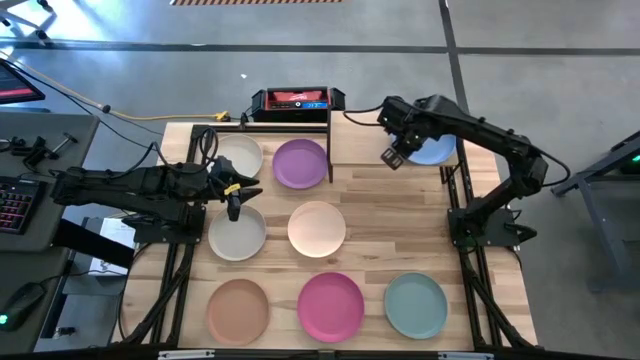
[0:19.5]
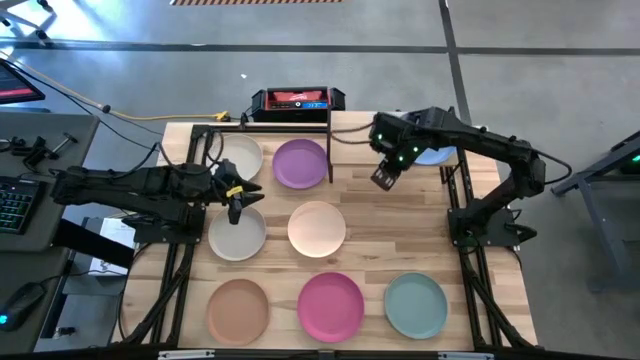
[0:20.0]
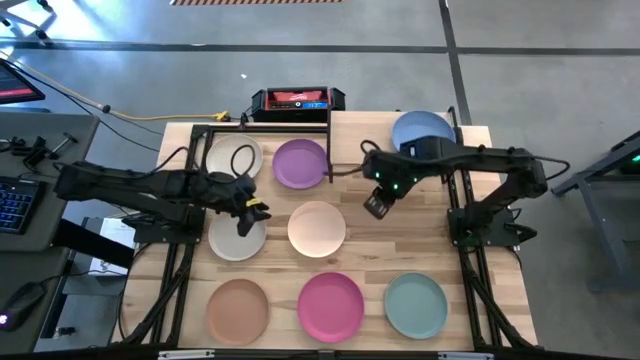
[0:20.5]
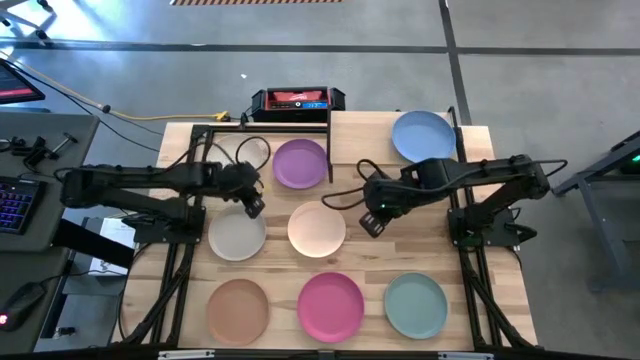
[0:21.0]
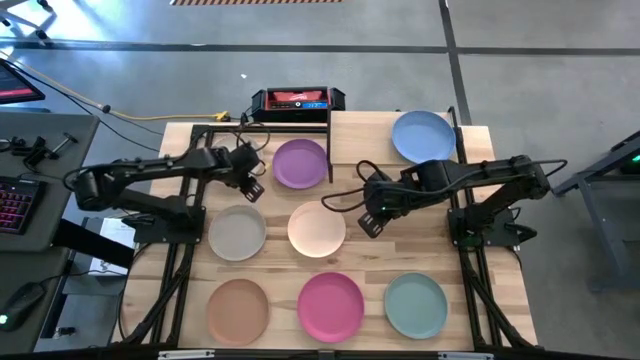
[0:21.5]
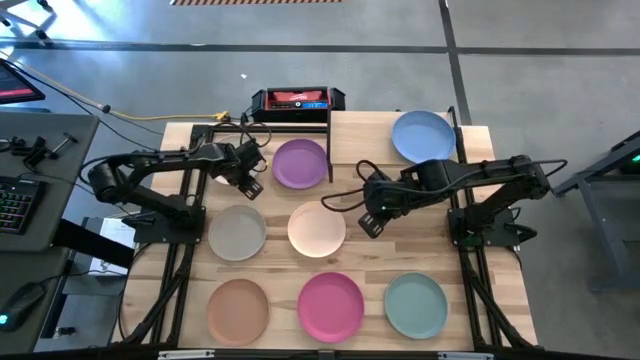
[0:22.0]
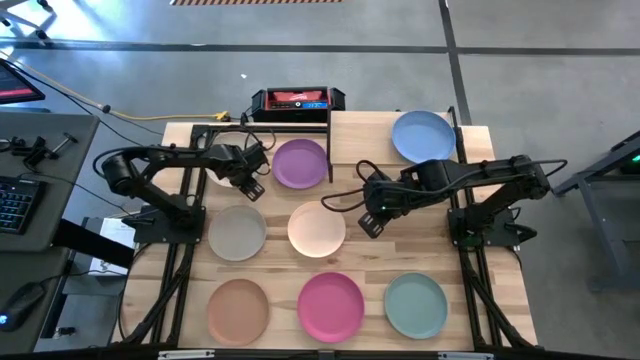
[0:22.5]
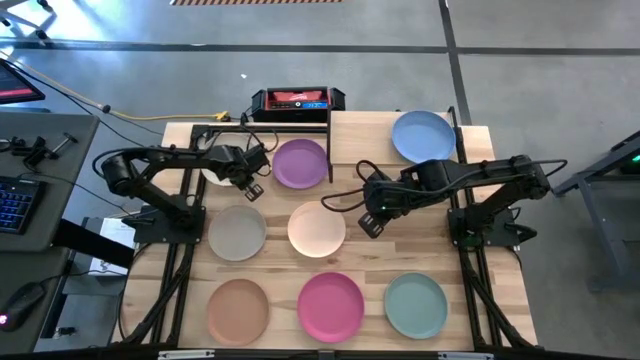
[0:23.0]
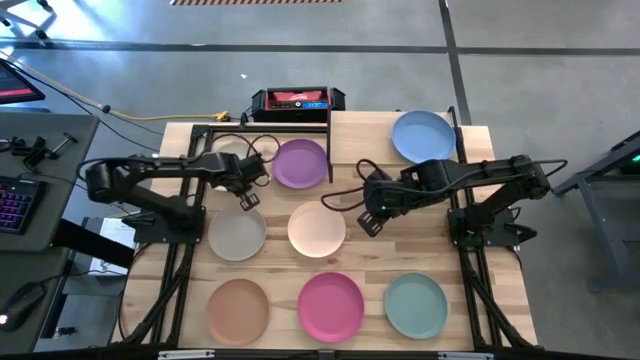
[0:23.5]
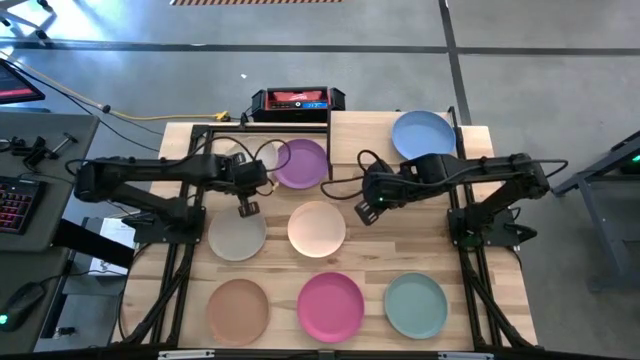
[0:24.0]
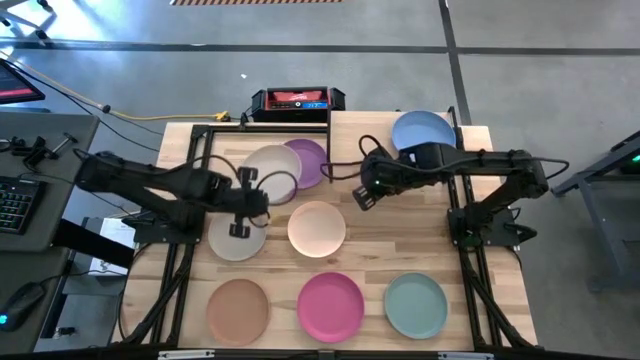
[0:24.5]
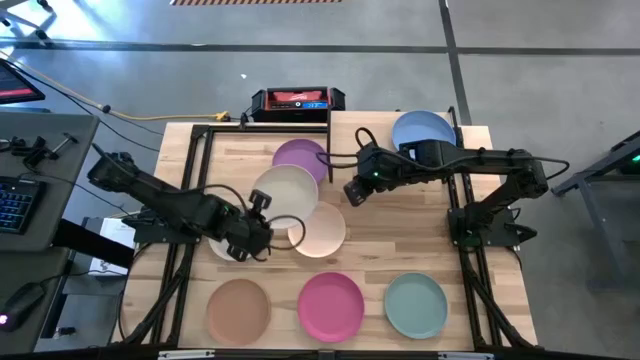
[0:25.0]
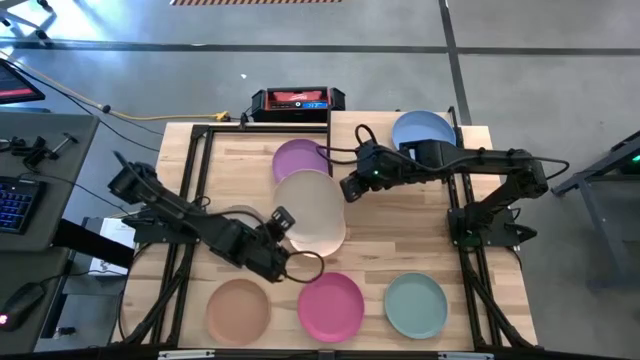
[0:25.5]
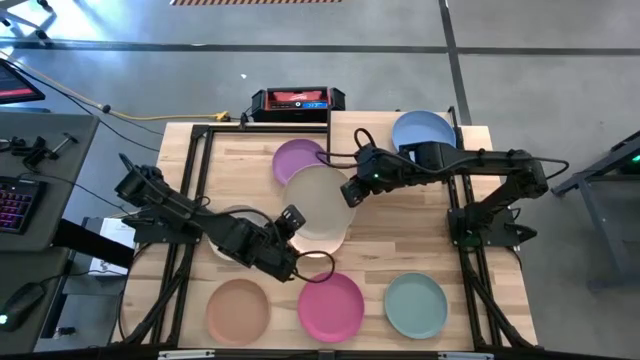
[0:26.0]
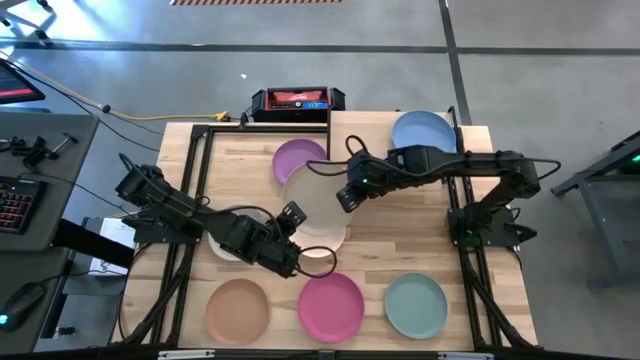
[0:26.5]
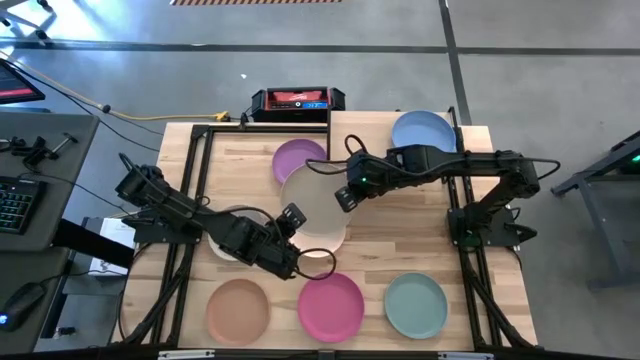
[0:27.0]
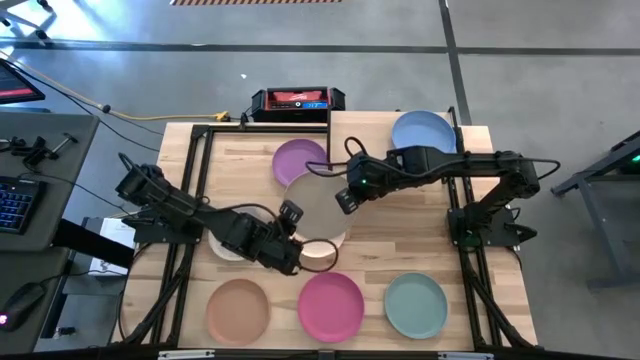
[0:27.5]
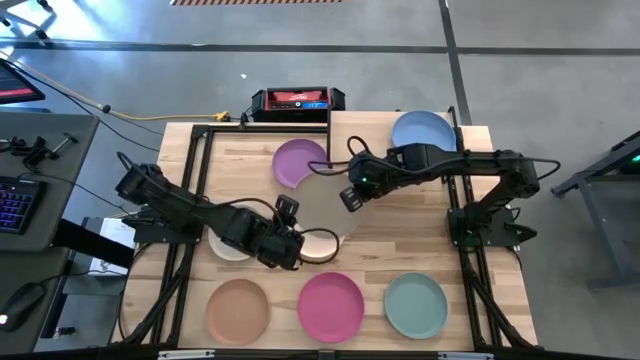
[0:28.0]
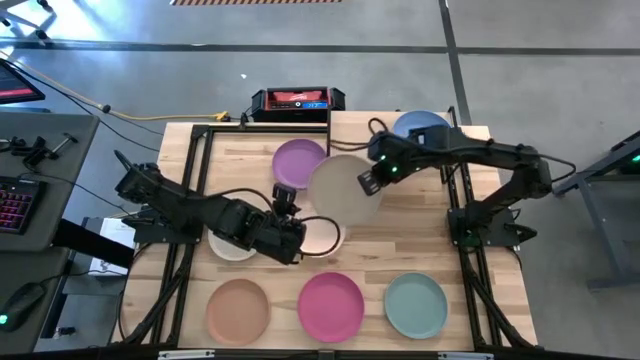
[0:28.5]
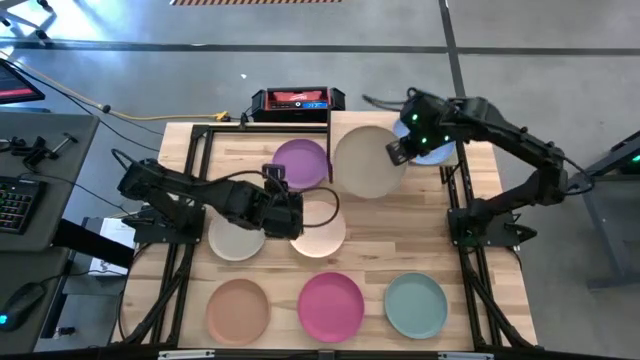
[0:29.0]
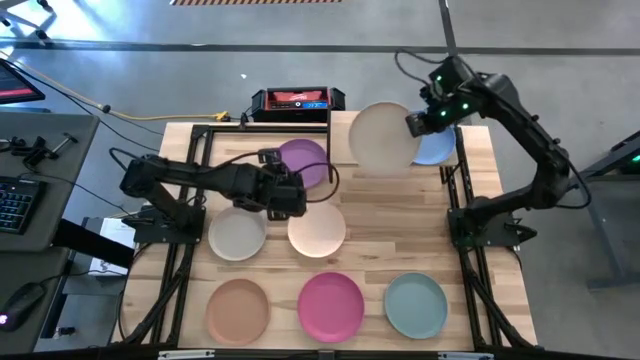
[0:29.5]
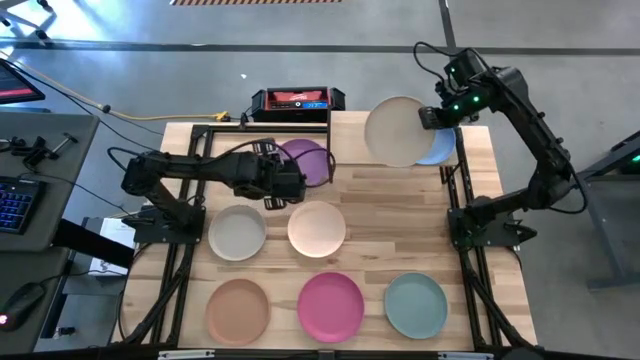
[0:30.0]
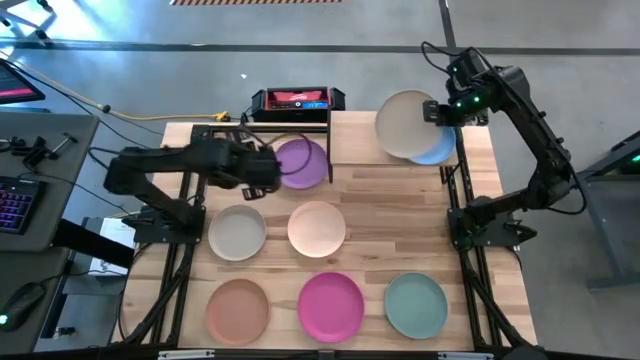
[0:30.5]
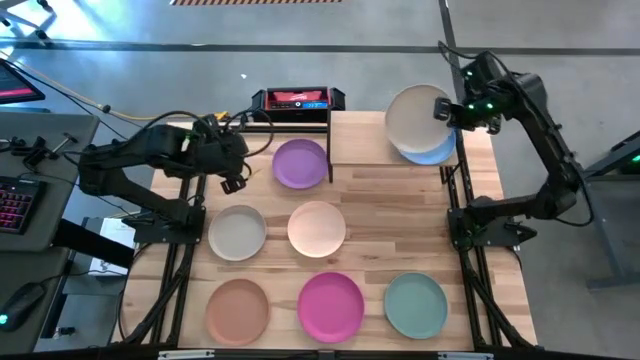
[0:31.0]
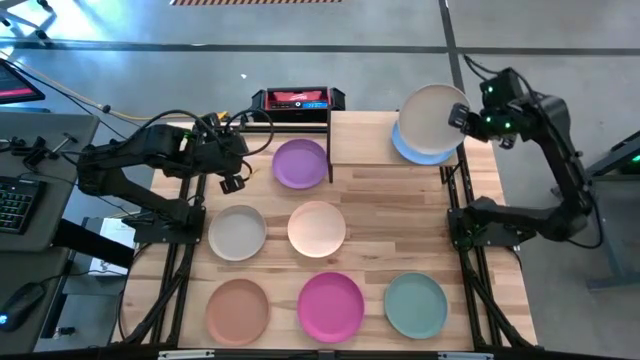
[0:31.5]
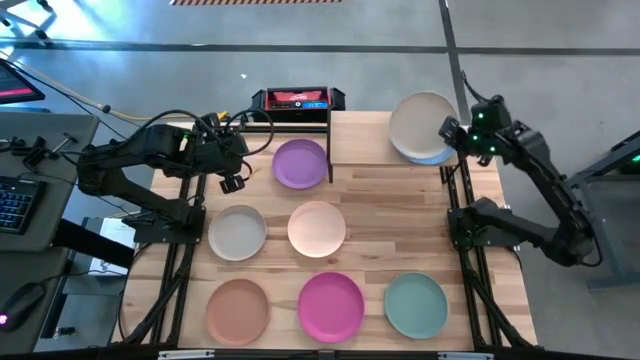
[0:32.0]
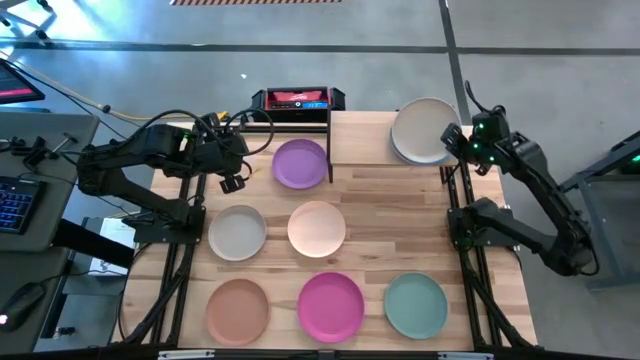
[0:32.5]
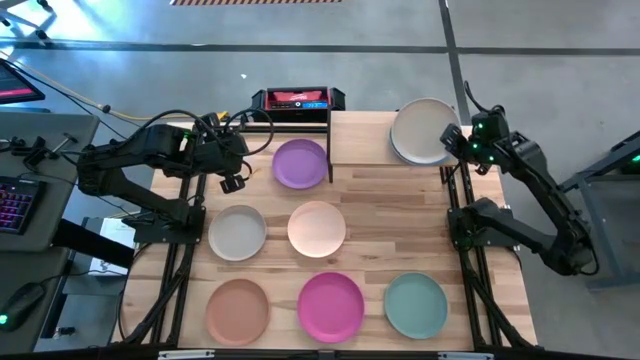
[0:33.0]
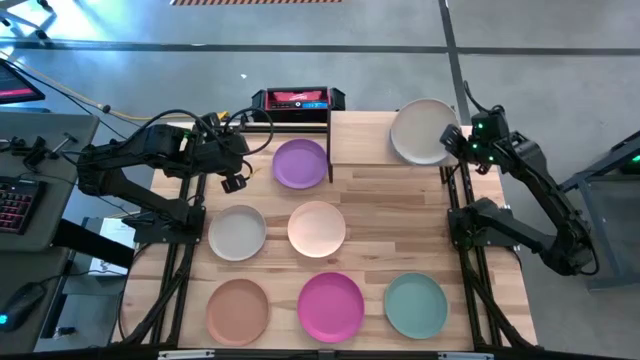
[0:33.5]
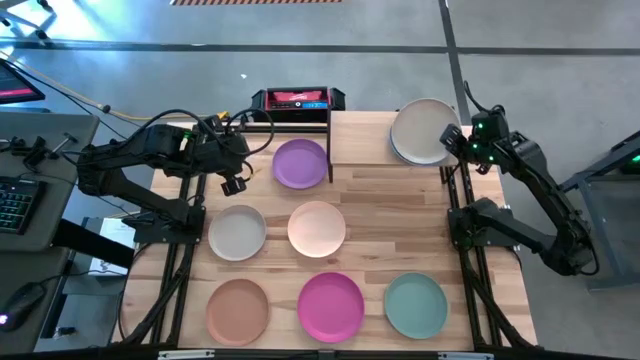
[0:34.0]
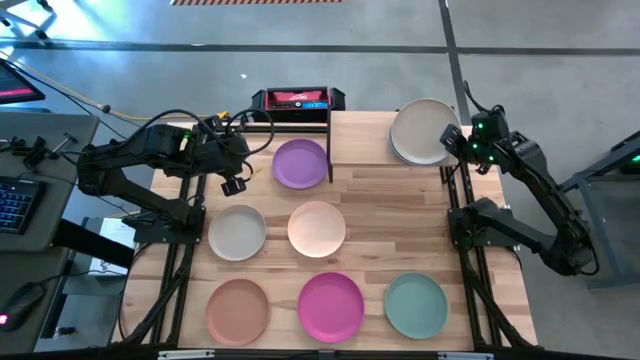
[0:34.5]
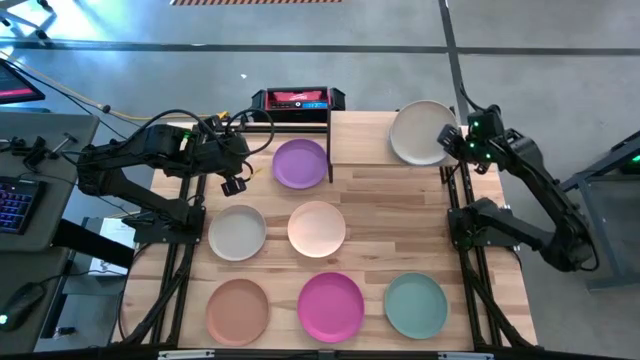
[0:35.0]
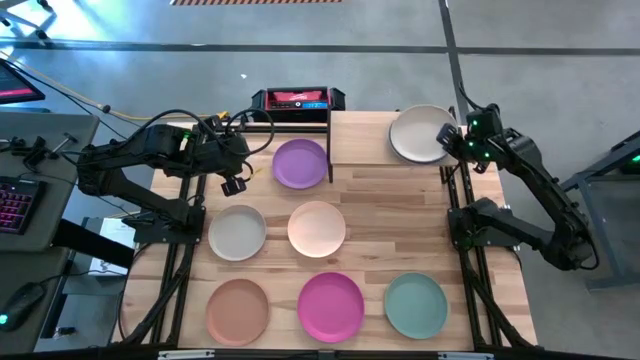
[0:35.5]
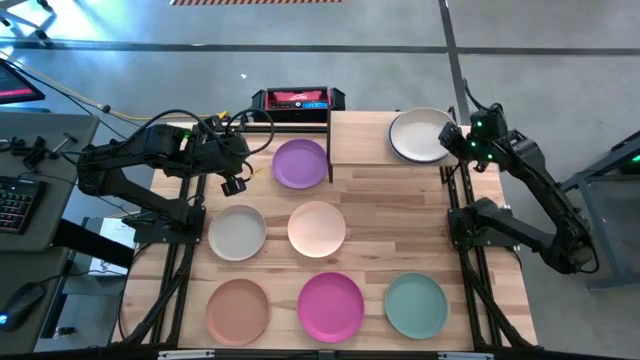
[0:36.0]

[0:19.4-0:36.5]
Task: Place and stack plates onto a shelf
Stack the white plate on top of the blue plate on the shelf

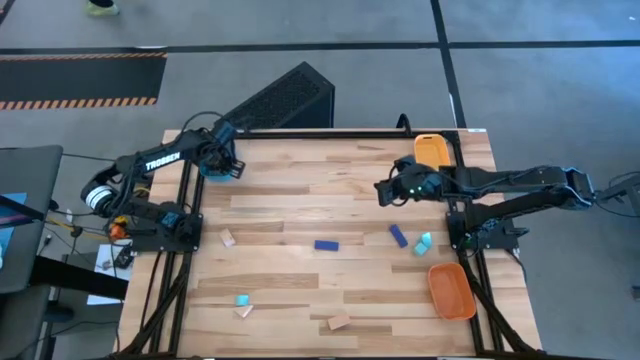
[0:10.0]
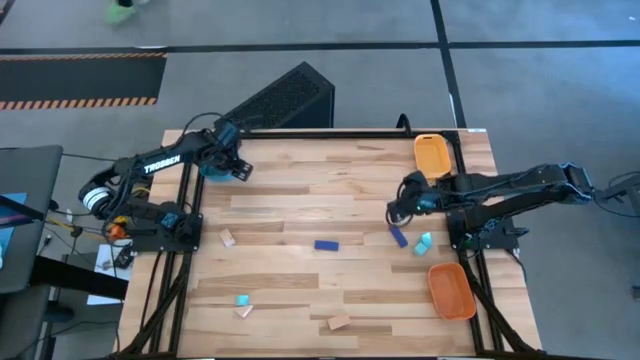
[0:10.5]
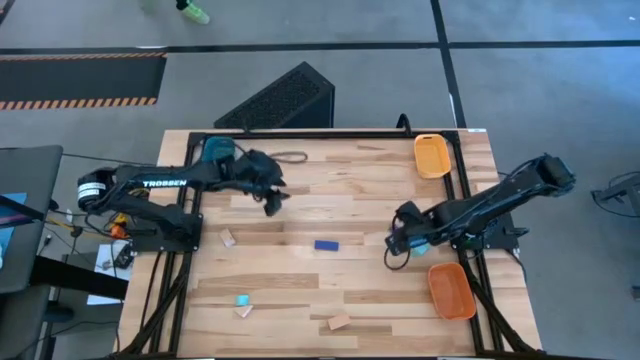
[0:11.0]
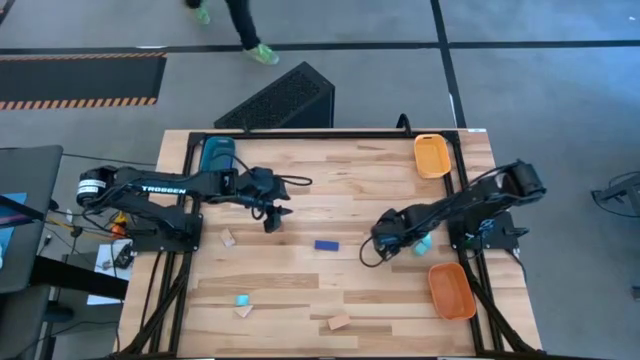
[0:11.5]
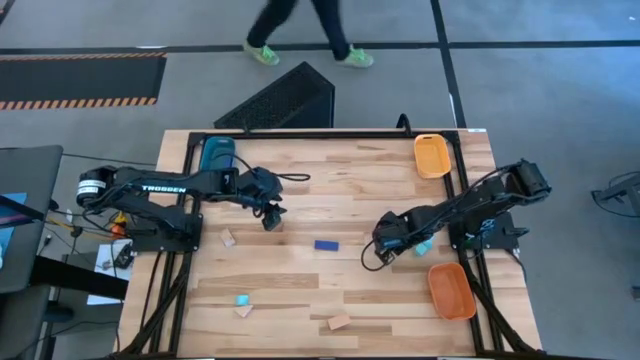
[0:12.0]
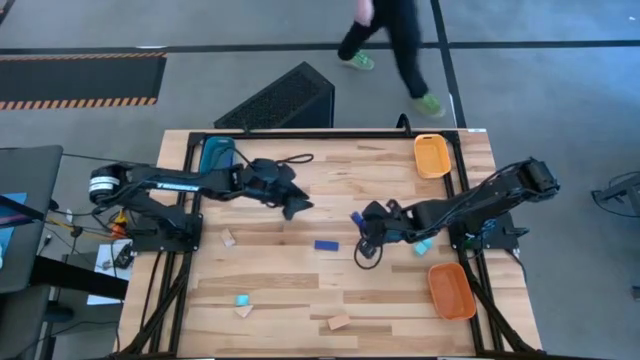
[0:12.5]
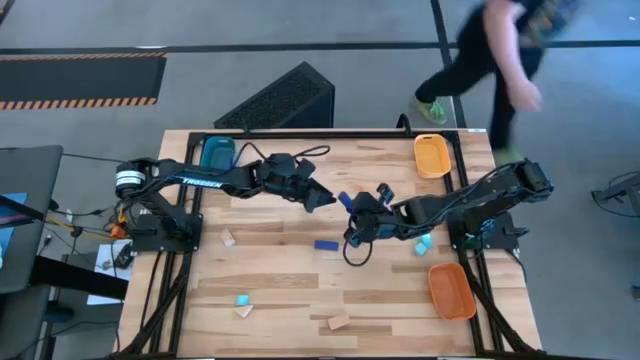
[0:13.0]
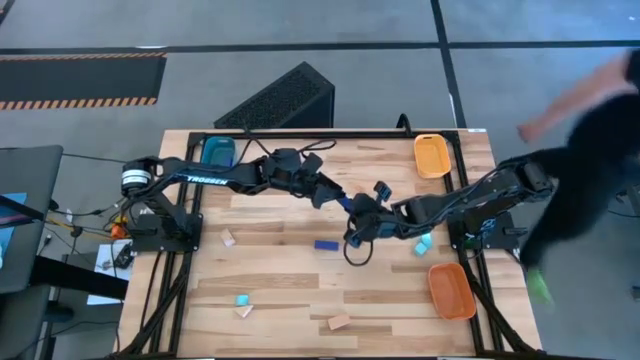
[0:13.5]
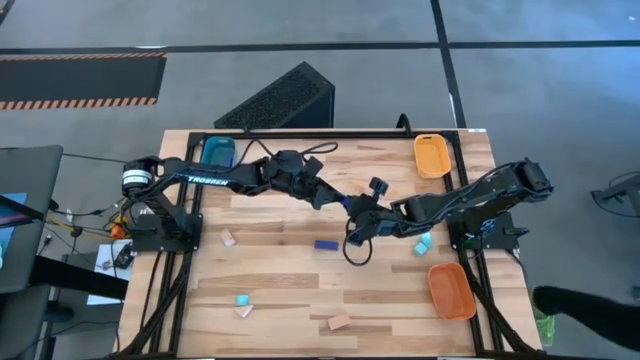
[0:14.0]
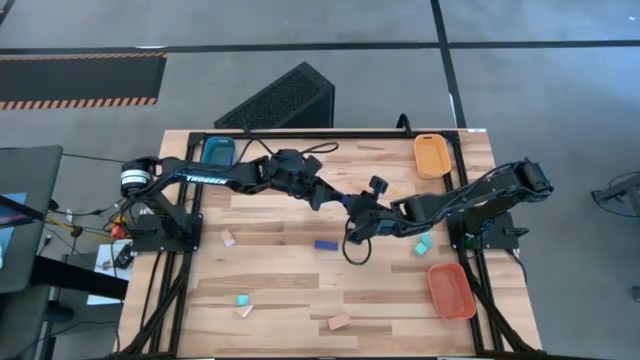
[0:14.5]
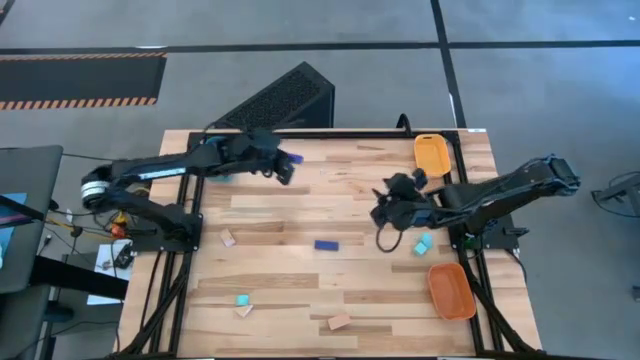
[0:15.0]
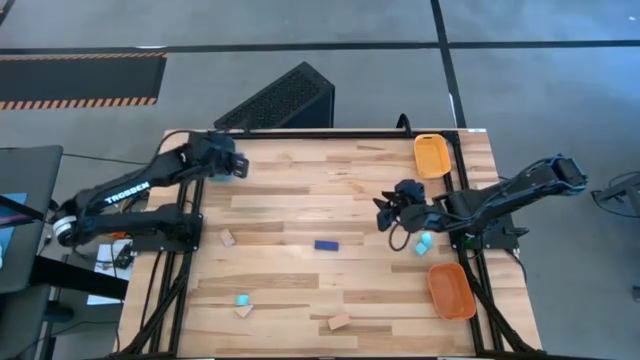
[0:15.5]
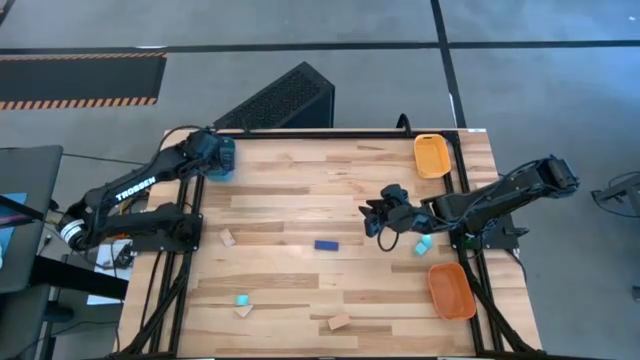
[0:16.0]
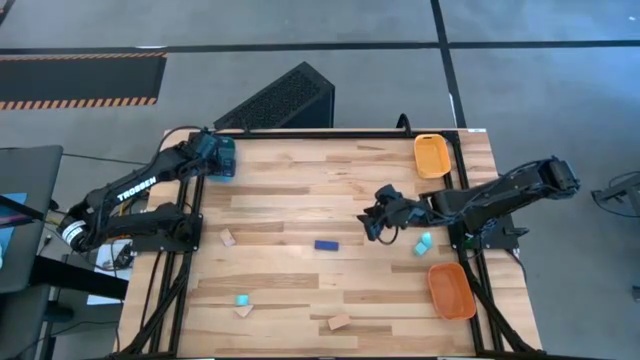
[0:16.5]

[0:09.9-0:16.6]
Task: Sort & place blocks by color
Put the right blue block into the blue bin
